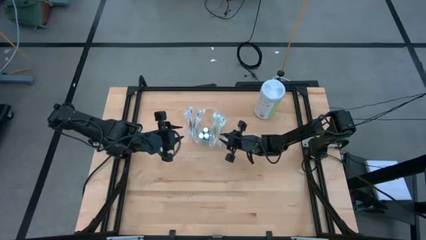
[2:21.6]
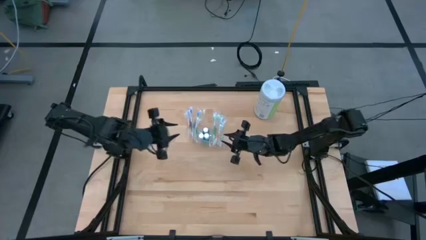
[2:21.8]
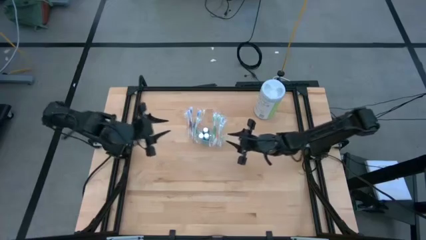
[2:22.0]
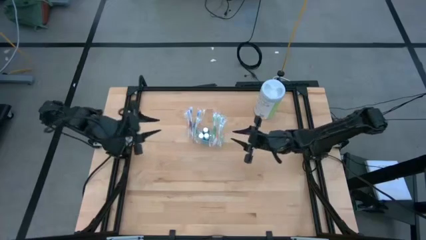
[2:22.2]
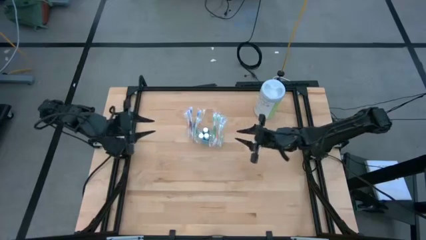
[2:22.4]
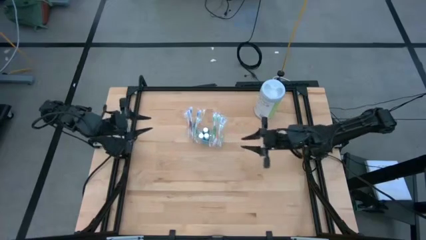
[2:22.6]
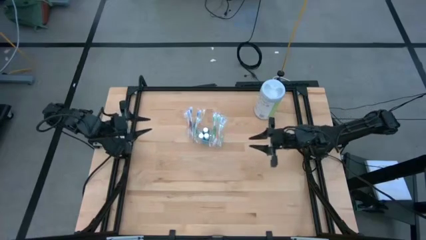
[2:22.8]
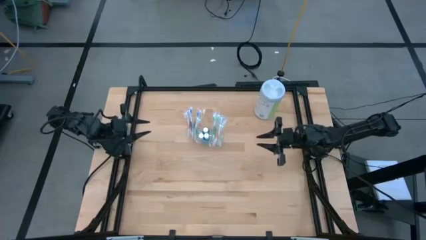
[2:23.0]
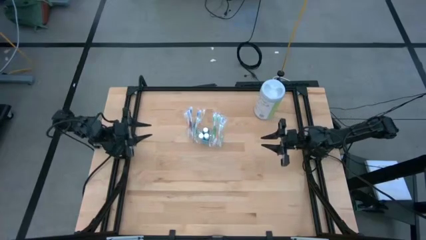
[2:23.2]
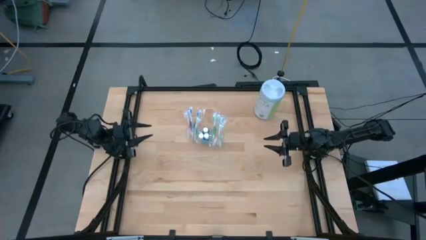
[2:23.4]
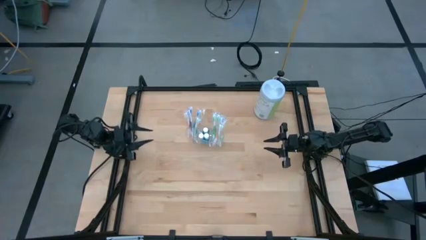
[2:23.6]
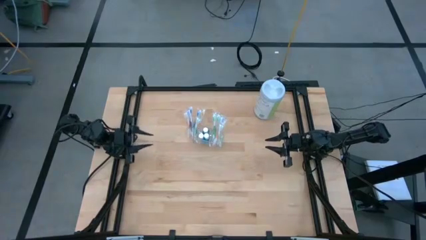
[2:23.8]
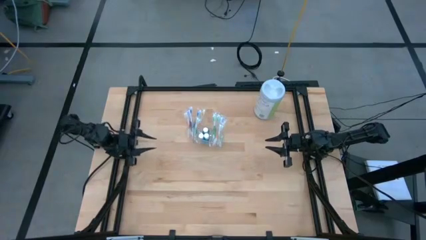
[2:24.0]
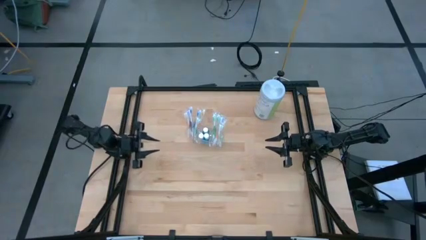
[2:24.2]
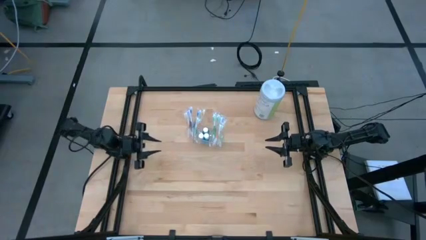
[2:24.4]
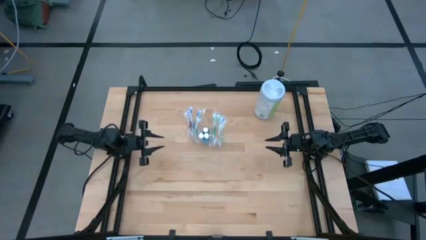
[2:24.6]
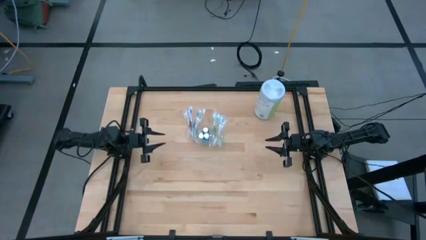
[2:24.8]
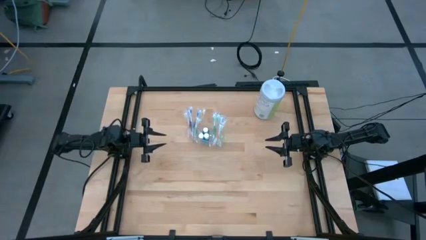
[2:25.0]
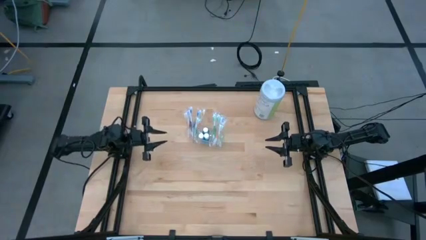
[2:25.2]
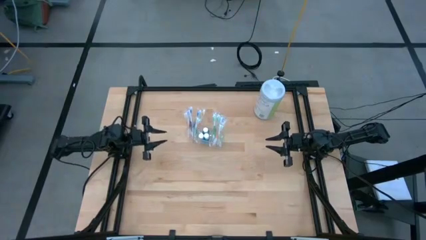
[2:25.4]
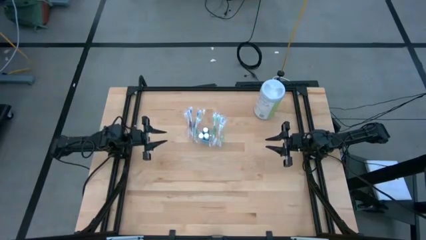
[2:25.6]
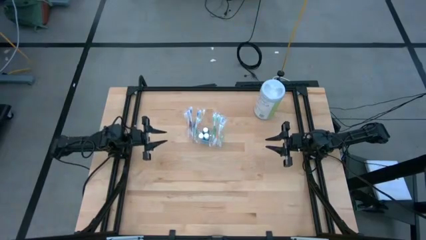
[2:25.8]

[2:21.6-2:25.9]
Task: Pick & Place toothbrushing station
Return to Home Position

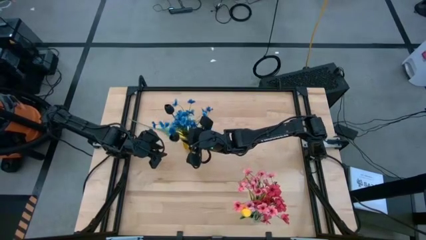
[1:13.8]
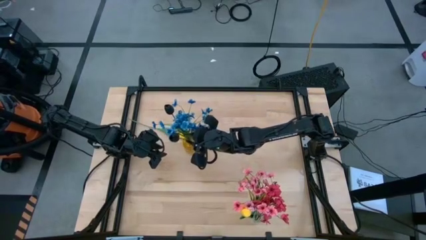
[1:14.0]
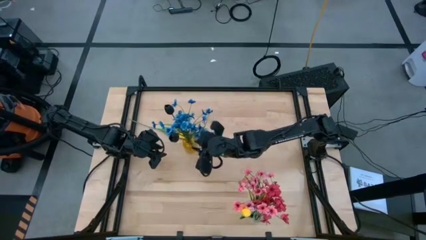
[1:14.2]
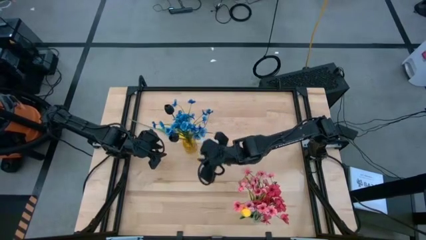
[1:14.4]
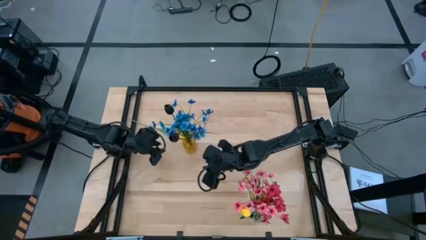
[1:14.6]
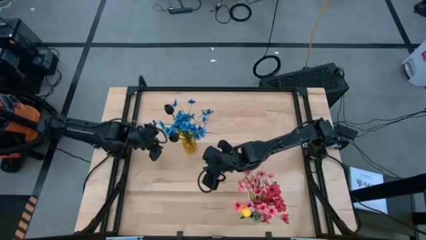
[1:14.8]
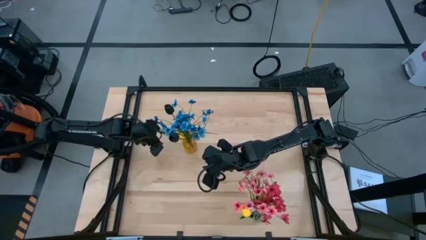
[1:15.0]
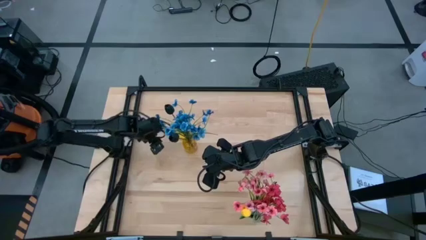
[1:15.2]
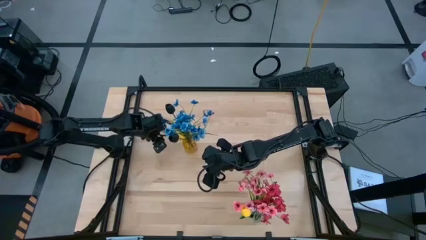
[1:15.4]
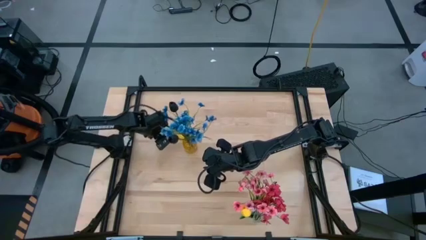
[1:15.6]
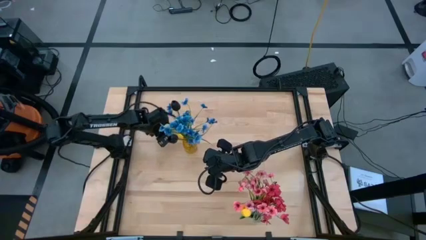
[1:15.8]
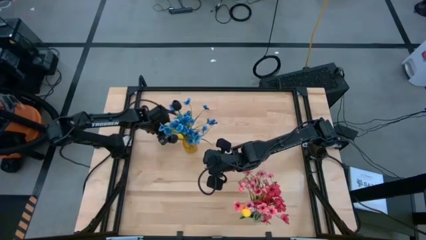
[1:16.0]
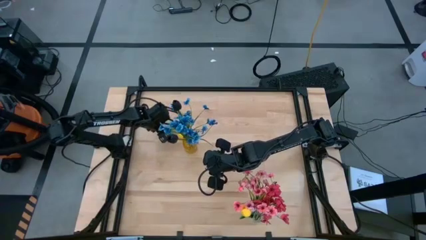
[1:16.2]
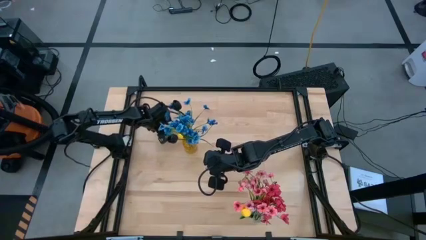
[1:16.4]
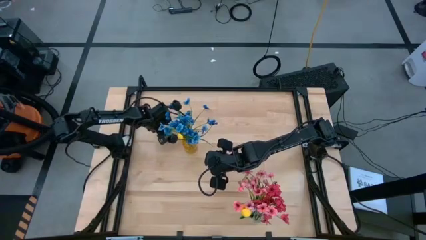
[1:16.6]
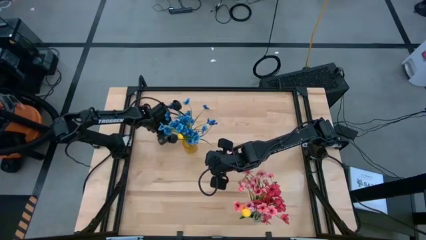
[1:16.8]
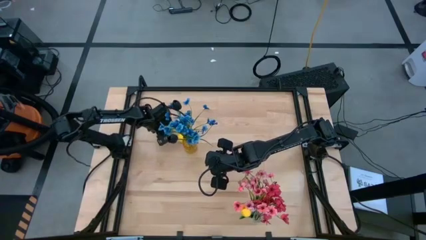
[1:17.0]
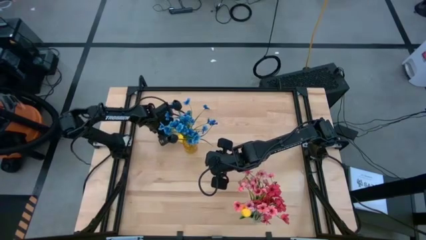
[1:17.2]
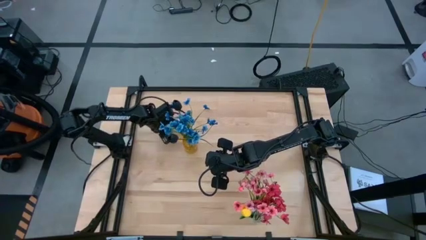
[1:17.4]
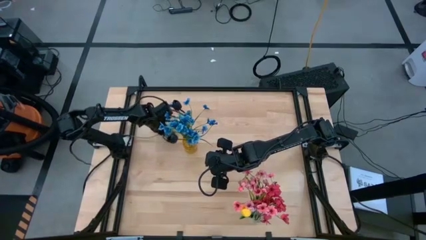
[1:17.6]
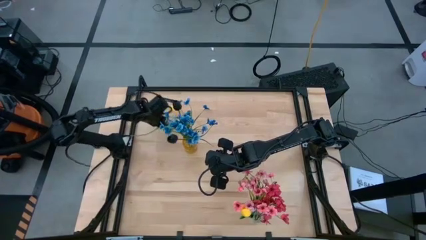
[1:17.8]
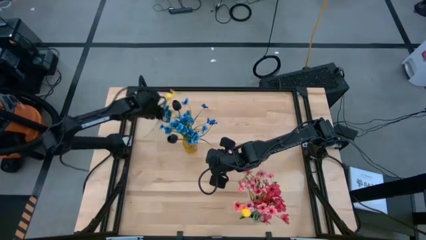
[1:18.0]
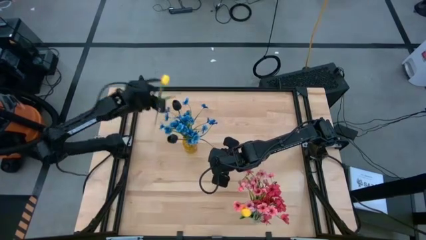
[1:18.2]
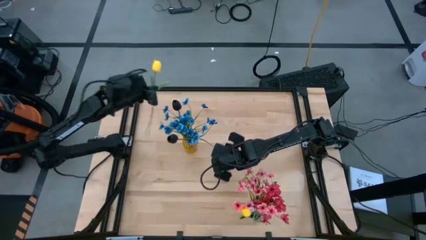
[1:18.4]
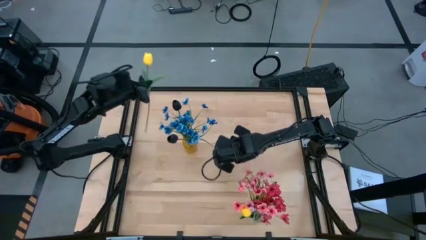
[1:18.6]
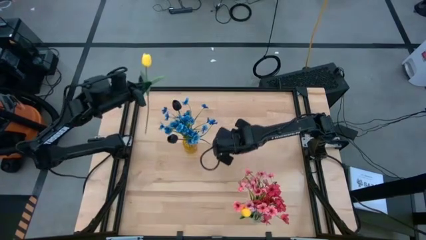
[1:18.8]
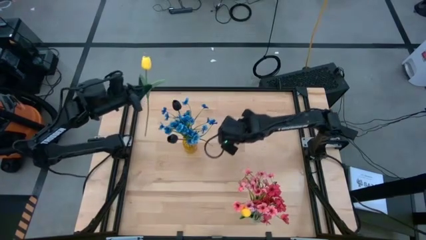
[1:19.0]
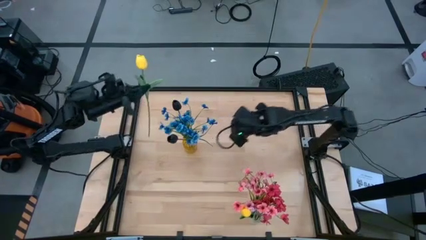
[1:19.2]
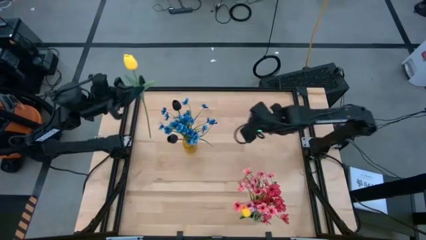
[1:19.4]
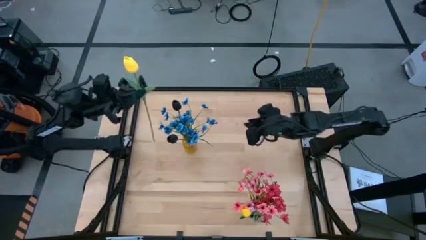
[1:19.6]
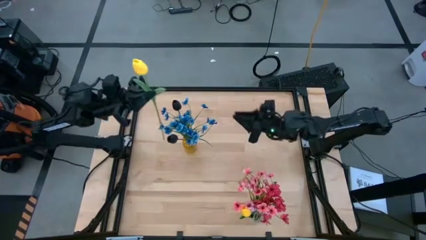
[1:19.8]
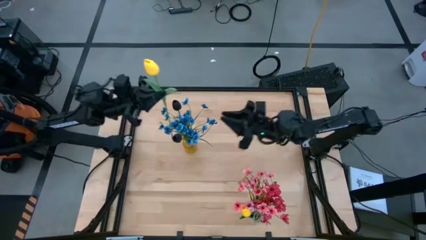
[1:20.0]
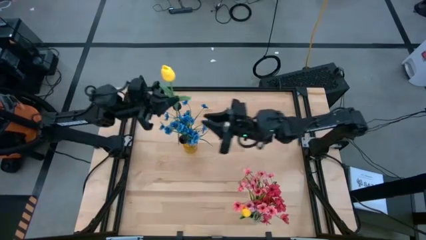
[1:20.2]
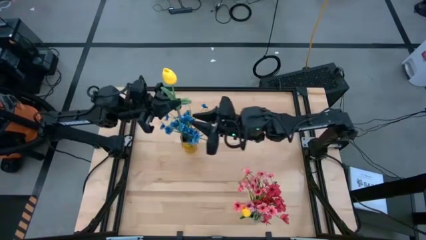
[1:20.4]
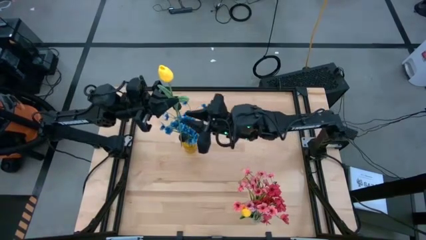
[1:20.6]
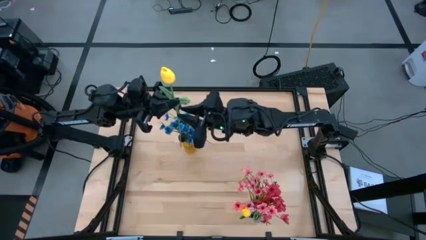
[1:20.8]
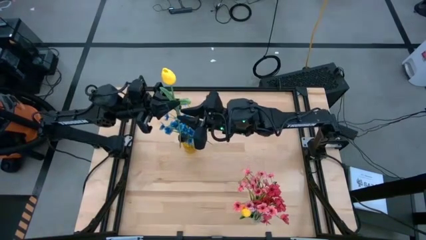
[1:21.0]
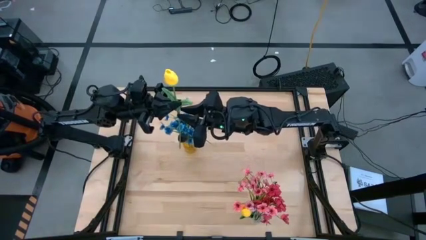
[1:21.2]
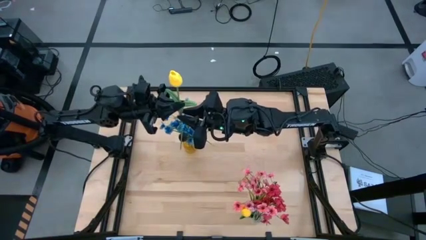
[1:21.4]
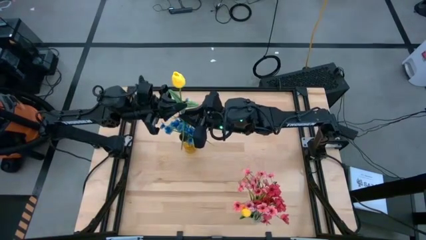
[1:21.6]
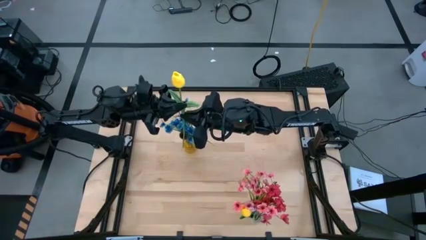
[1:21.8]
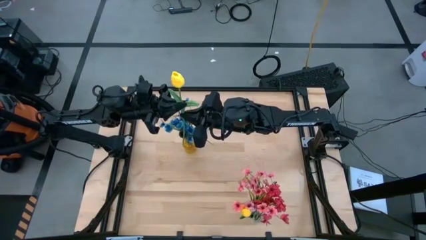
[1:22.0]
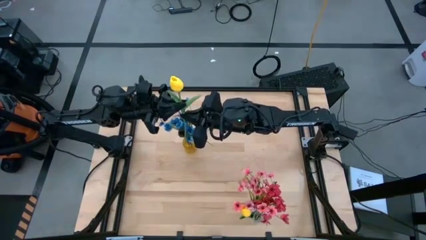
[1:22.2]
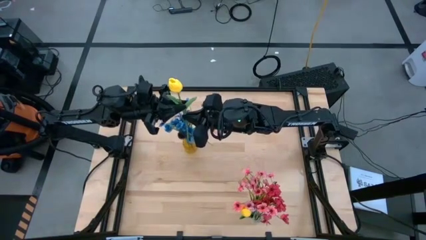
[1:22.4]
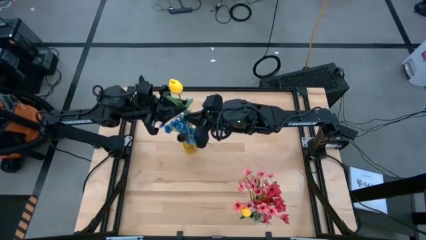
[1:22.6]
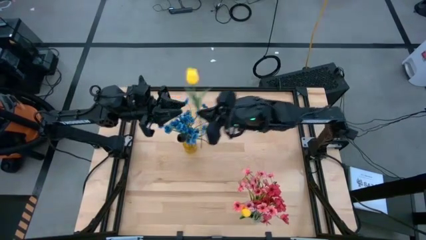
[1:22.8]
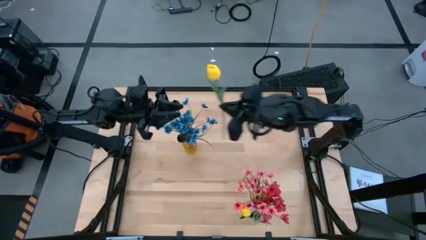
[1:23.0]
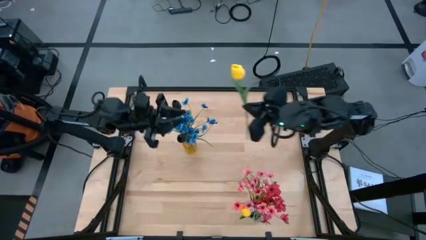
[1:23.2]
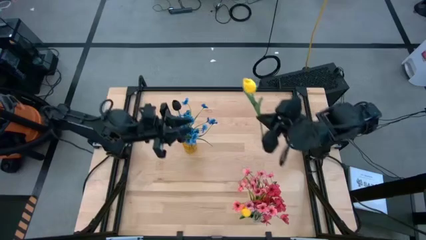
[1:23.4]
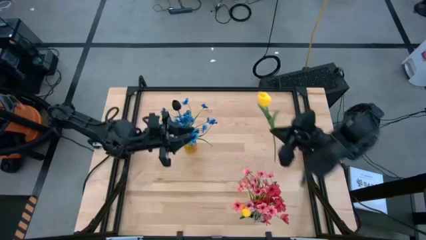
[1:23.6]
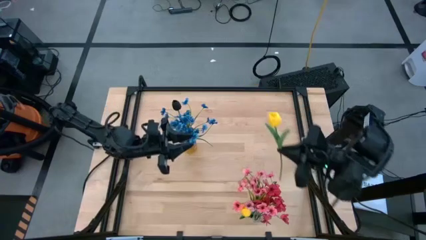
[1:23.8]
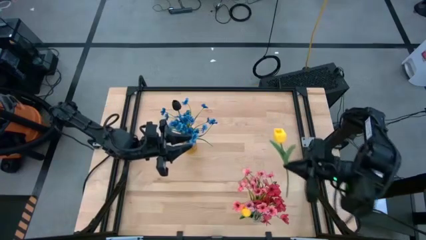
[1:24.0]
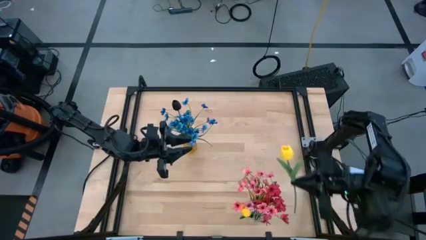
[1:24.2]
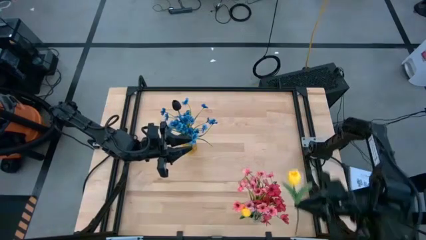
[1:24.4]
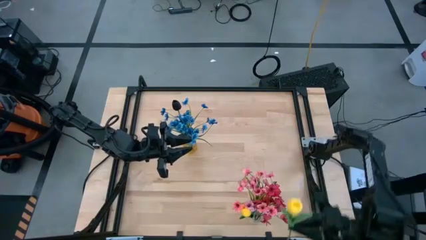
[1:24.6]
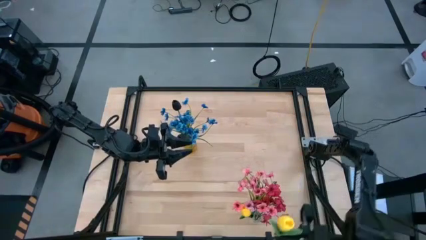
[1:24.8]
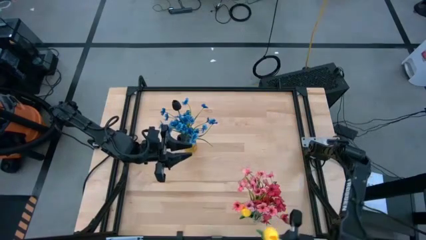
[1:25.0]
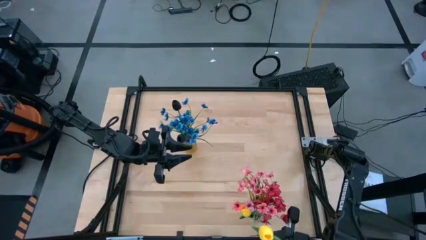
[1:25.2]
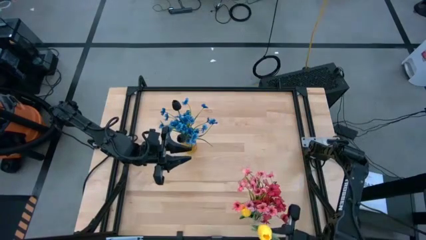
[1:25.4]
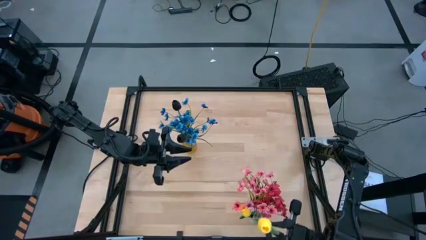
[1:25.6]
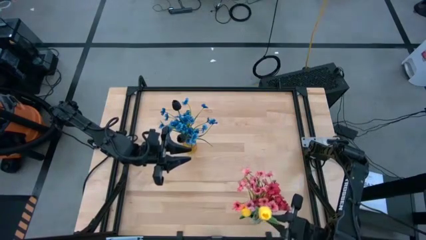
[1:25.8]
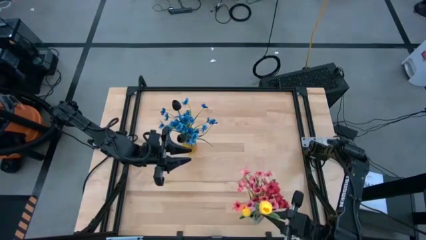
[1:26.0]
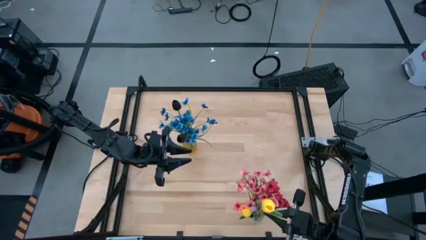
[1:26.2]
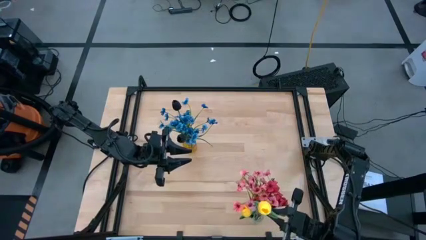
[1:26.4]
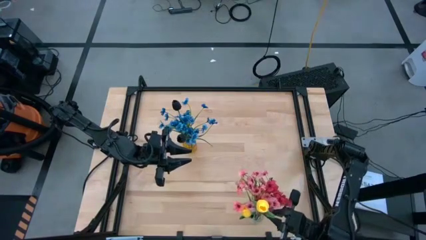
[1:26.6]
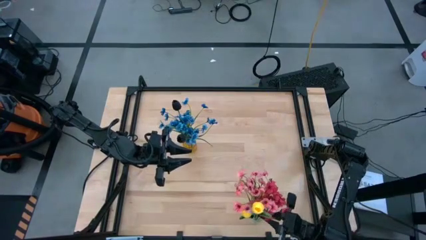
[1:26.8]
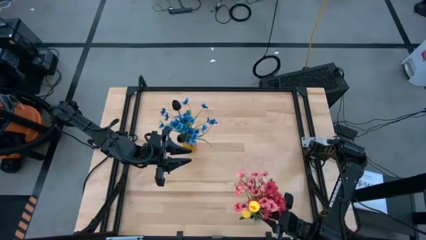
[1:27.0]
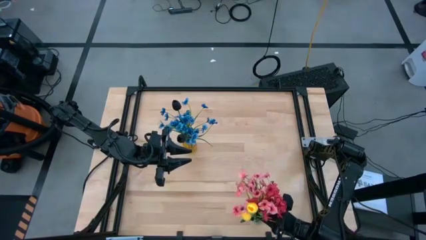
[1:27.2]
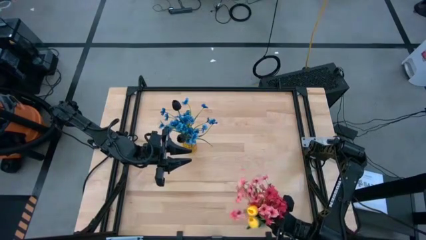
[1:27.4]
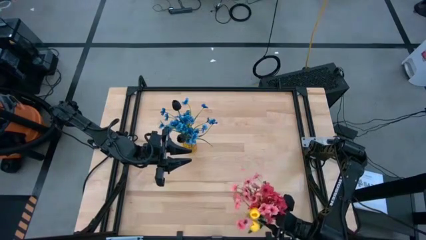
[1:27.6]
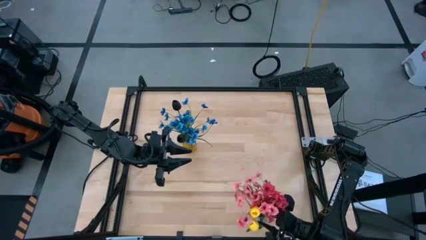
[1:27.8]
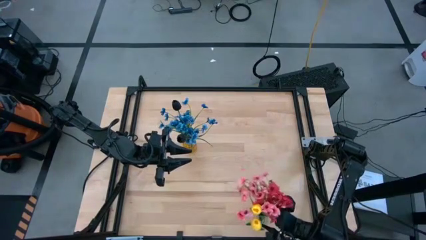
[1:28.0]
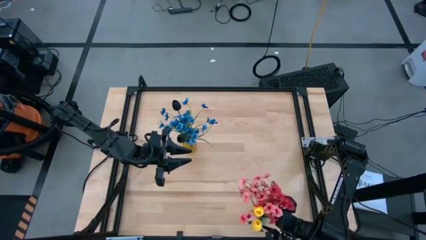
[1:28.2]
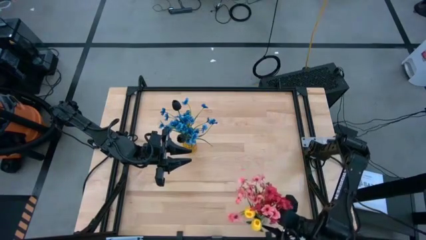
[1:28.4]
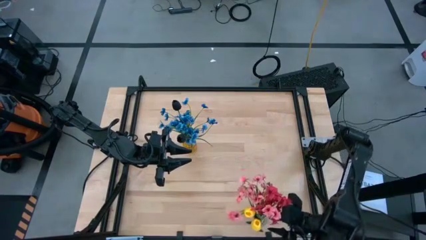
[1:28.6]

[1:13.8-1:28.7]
Task: Sort flowers into vase by color
Put the yellow flower into the transparent vase
